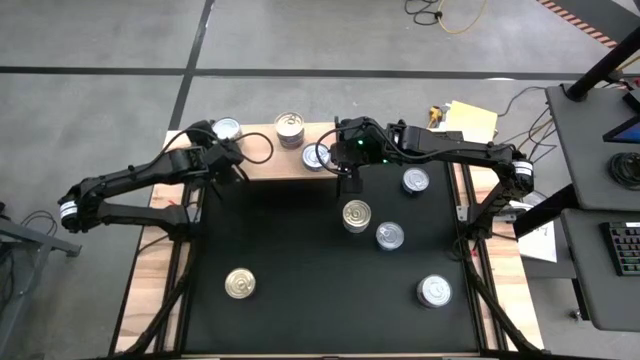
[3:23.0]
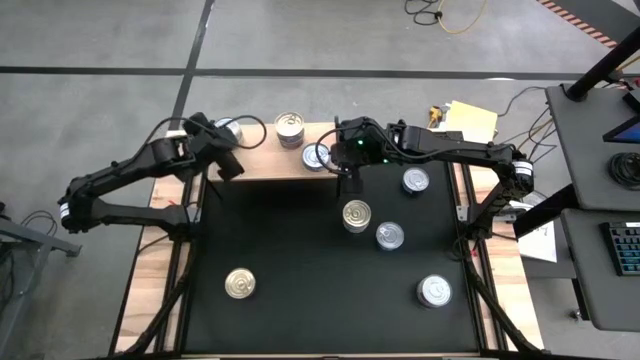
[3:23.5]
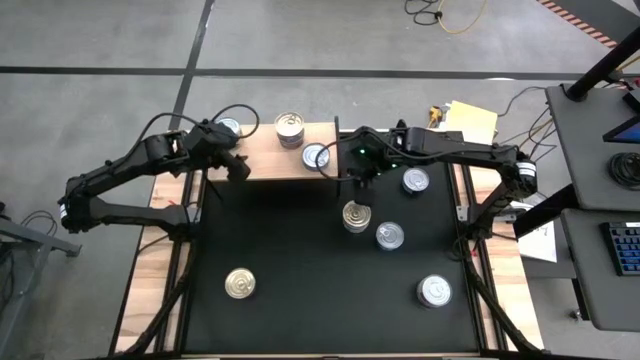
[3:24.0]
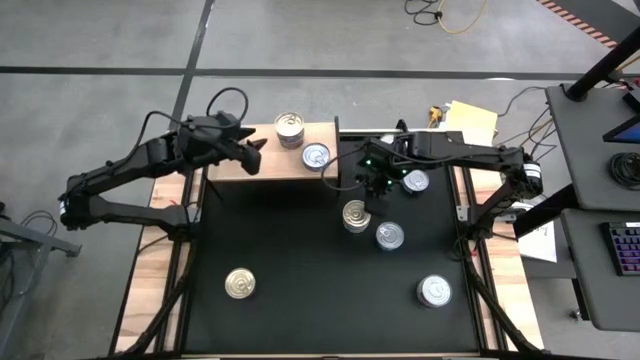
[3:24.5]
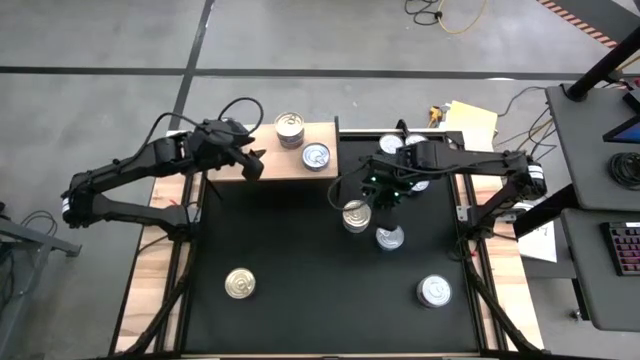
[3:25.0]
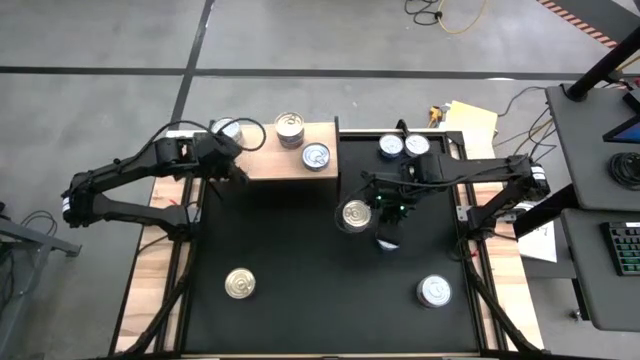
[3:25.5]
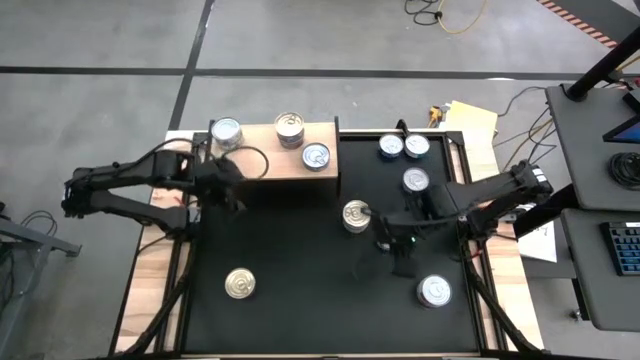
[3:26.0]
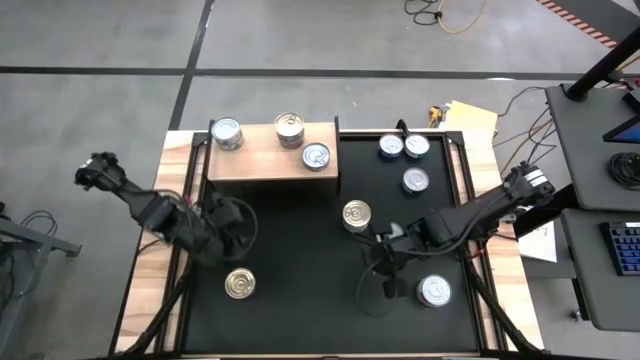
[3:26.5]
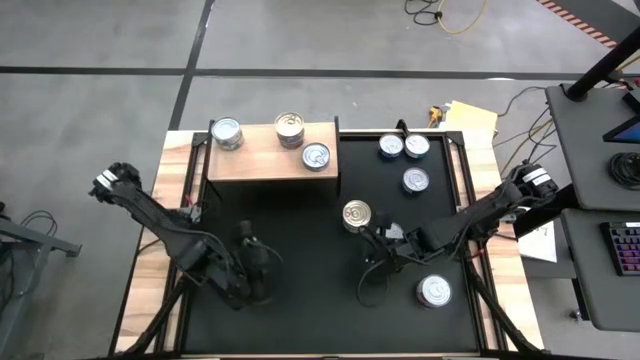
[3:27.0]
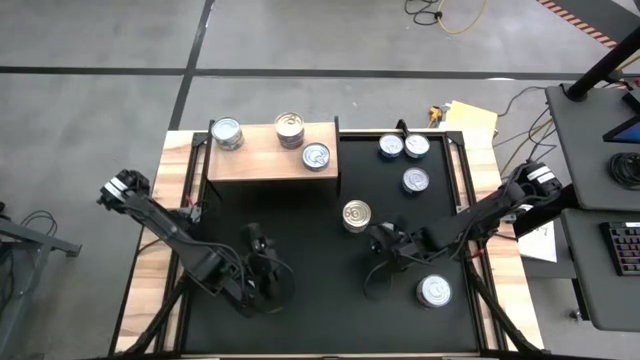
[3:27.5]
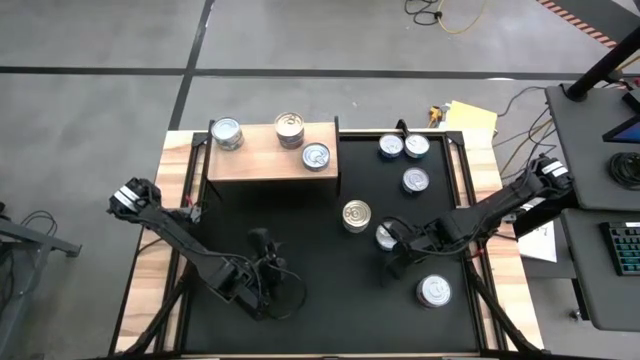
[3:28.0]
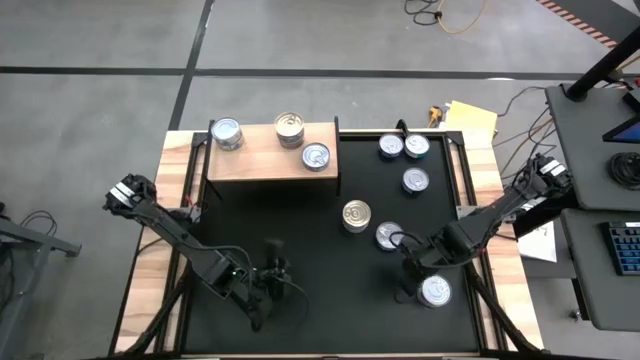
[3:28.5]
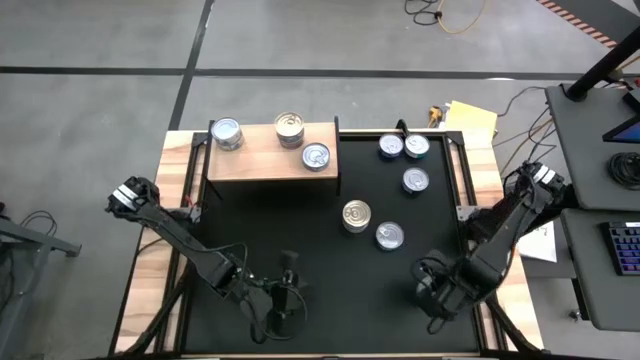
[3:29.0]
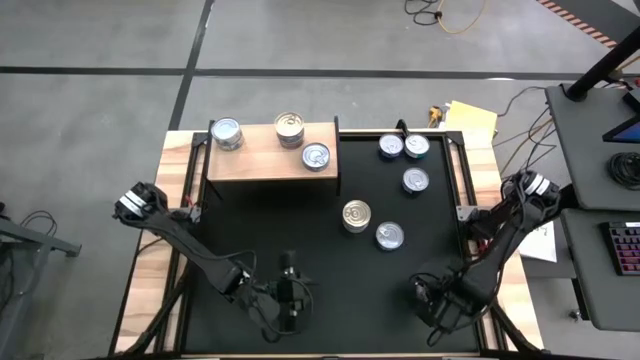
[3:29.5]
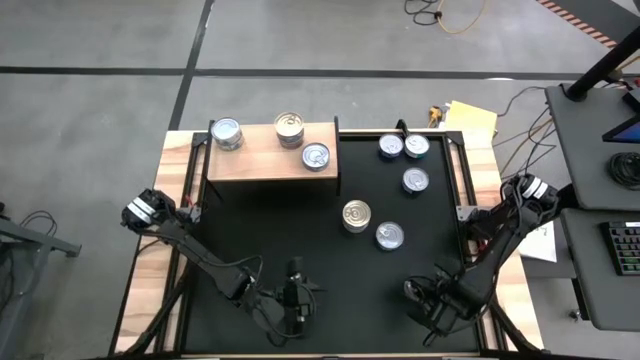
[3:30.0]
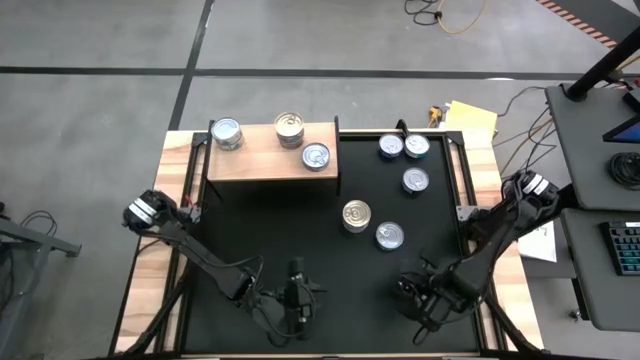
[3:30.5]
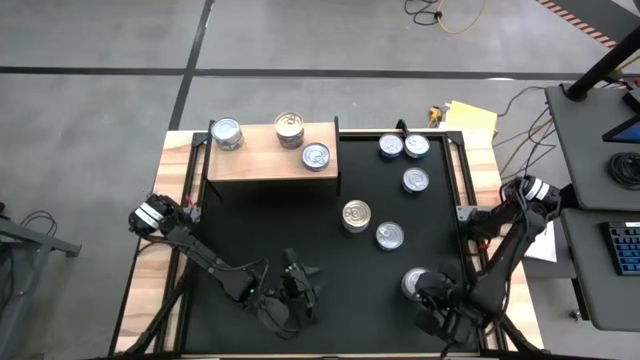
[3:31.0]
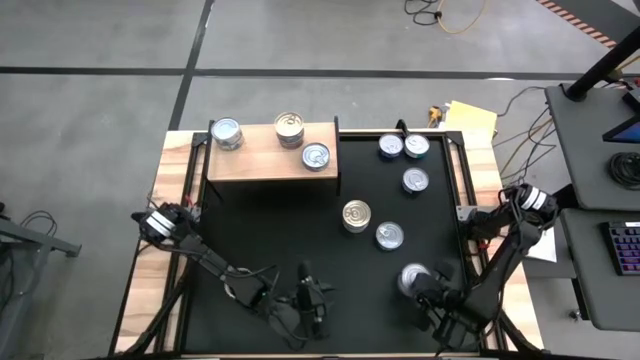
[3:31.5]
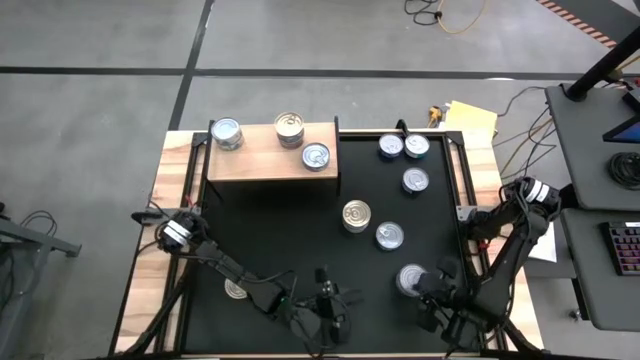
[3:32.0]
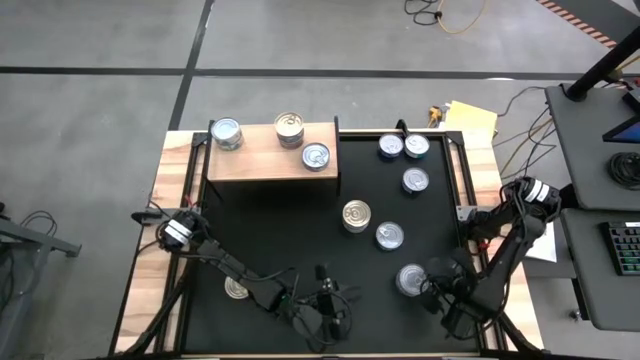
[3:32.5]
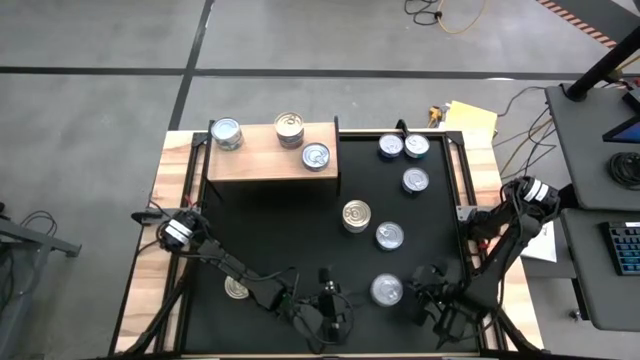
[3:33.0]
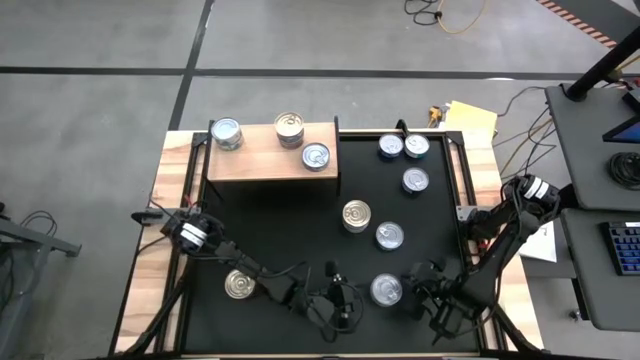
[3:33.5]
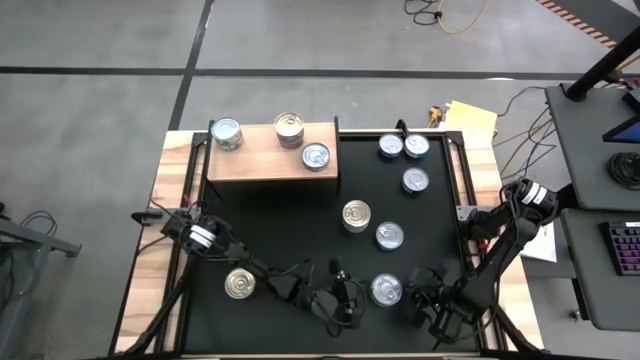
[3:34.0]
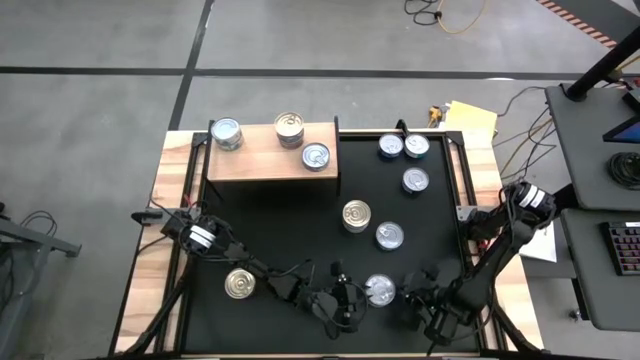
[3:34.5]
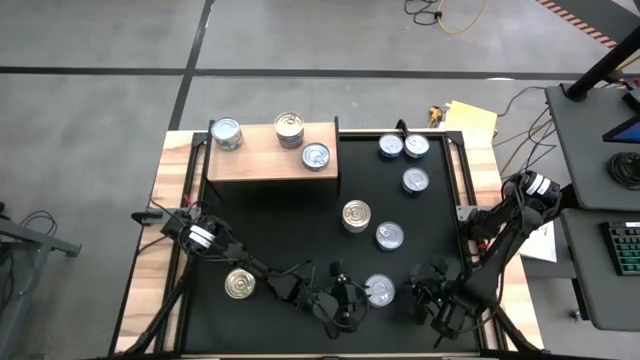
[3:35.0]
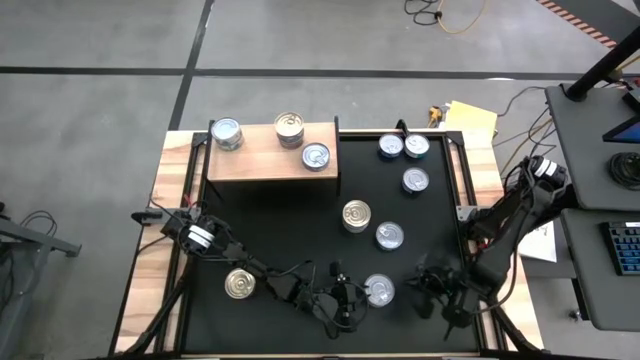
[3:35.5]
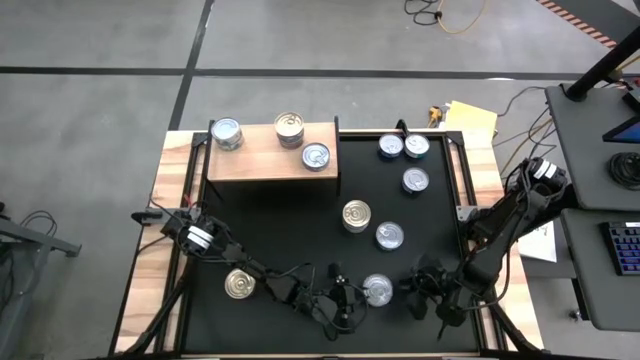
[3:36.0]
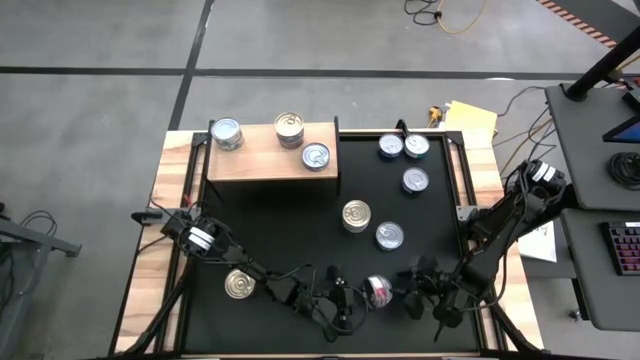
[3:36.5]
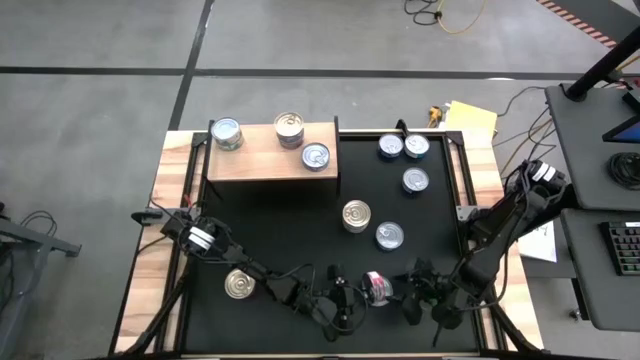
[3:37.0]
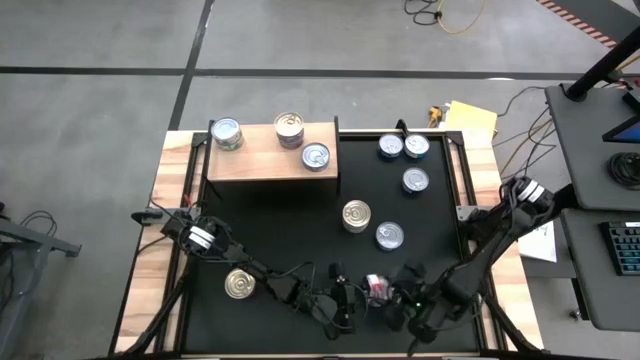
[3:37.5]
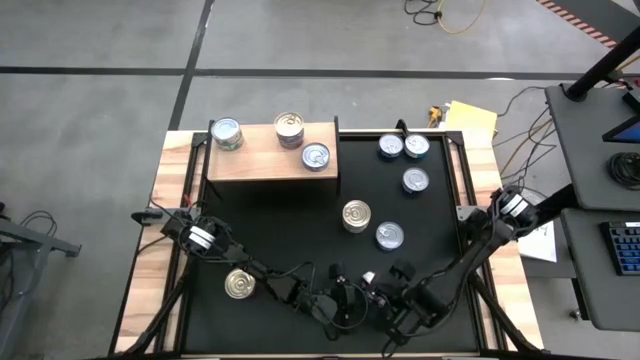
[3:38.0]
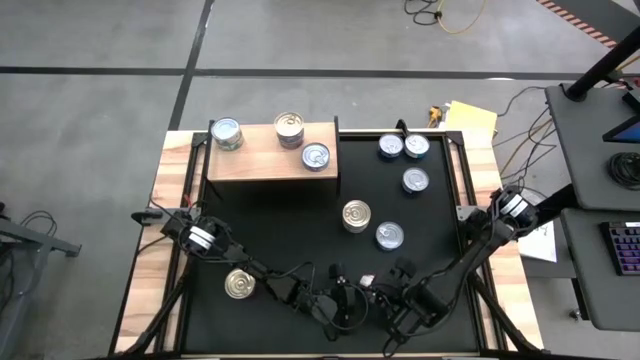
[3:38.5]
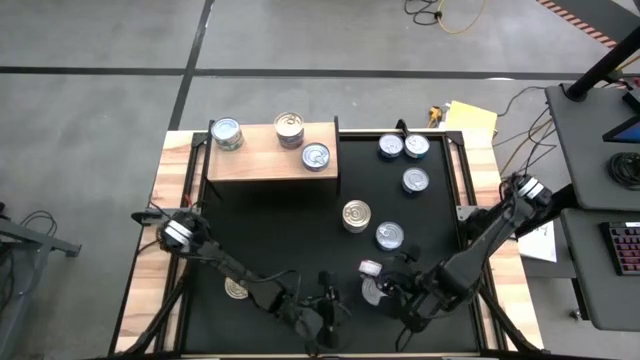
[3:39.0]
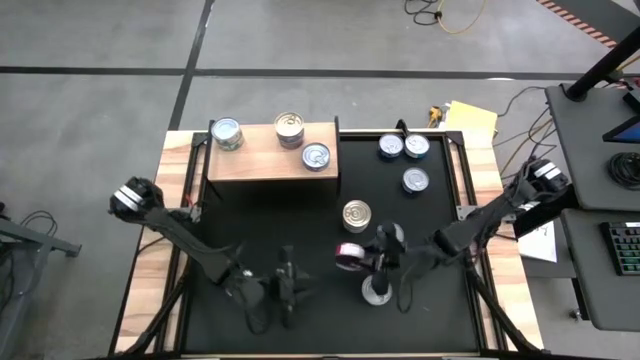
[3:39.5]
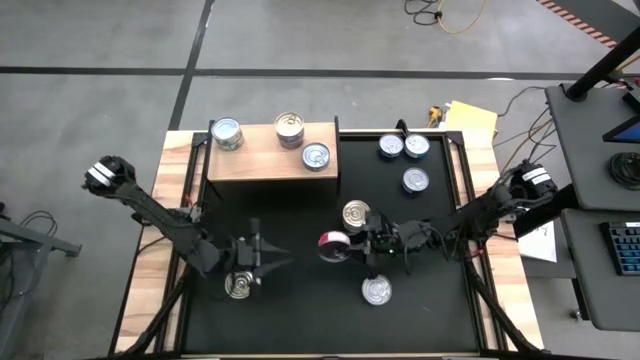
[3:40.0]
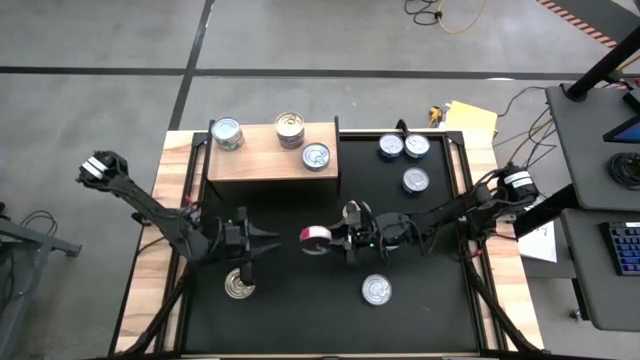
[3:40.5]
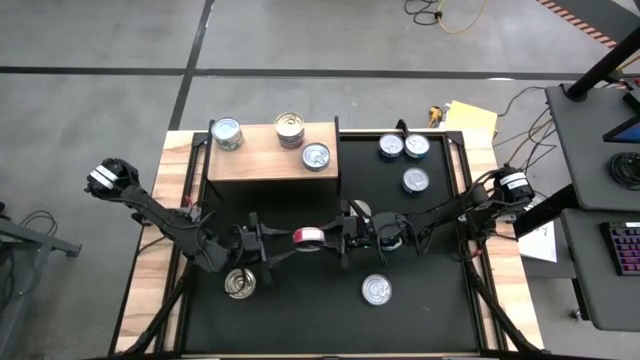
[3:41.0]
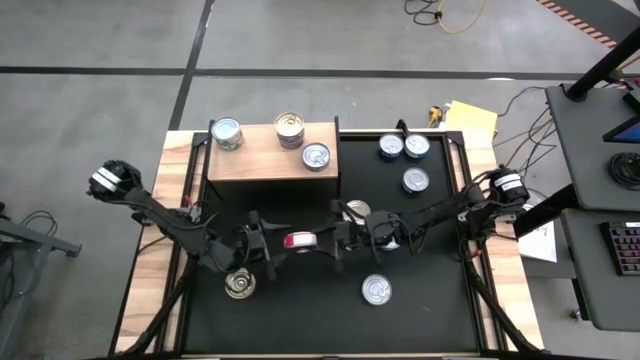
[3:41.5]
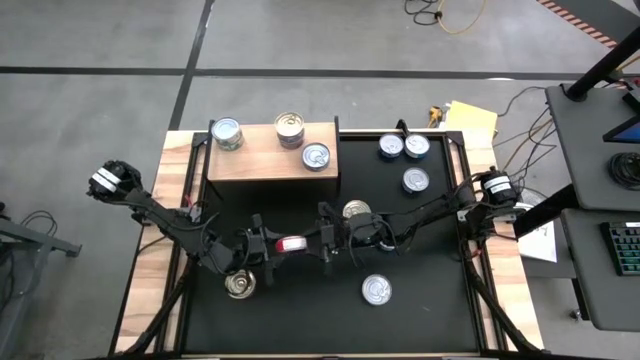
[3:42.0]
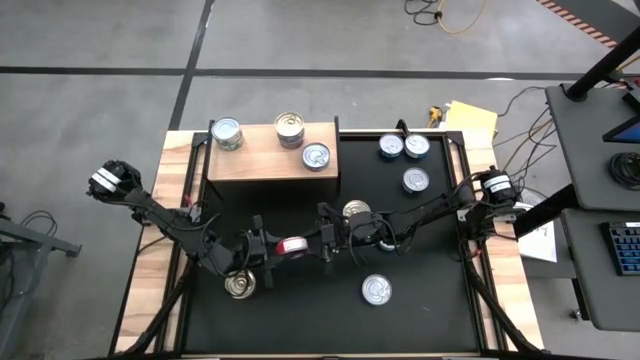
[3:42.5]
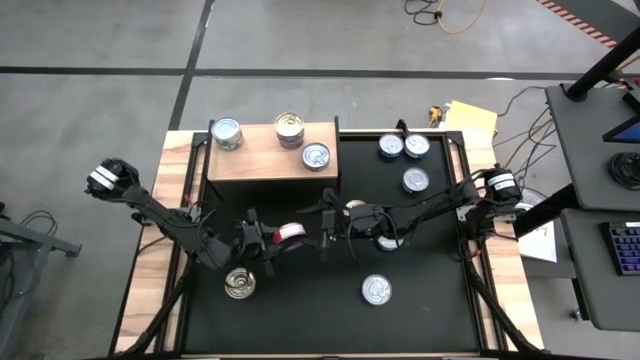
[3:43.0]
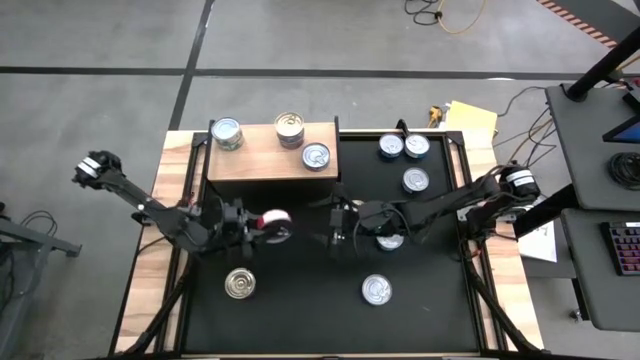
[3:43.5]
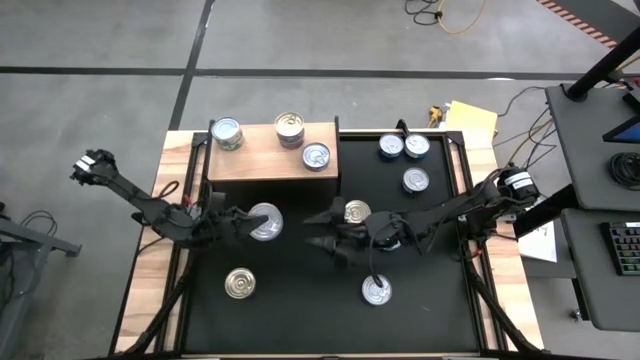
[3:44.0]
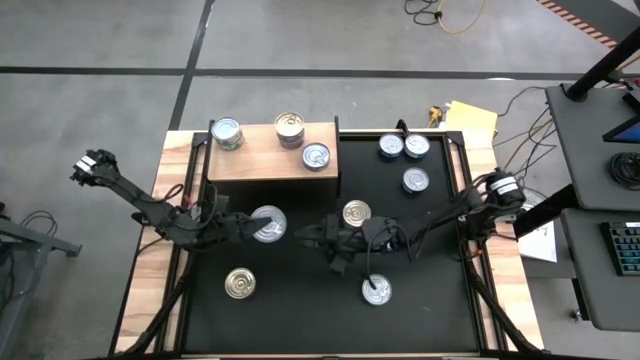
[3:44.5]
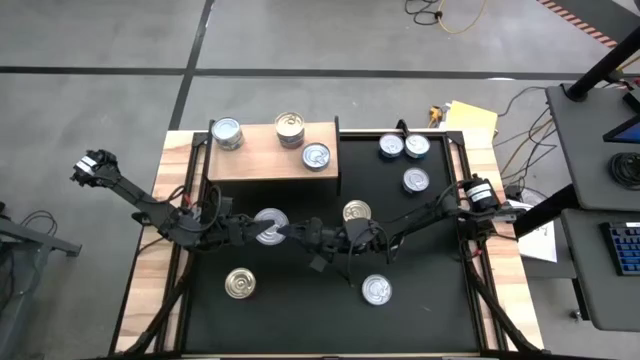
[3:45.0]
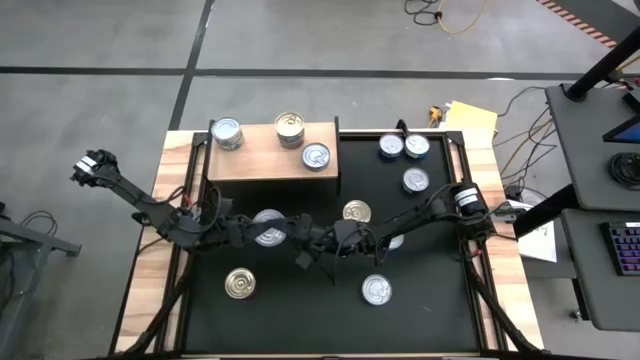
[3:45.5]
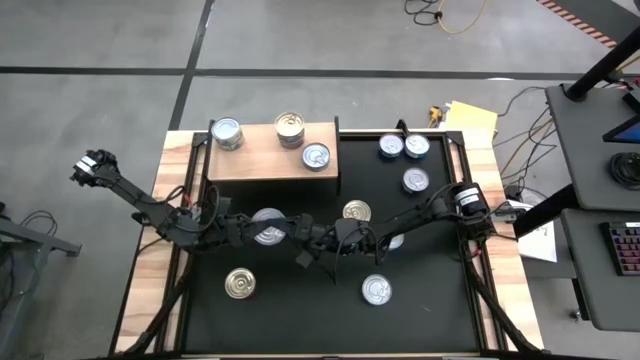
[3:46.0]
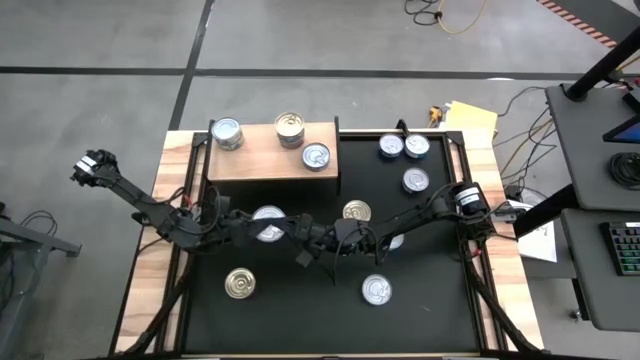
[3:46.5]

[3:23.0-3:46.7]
Task: Stack canned seafood by type on shelf
Put the red tuna can on the shelf
